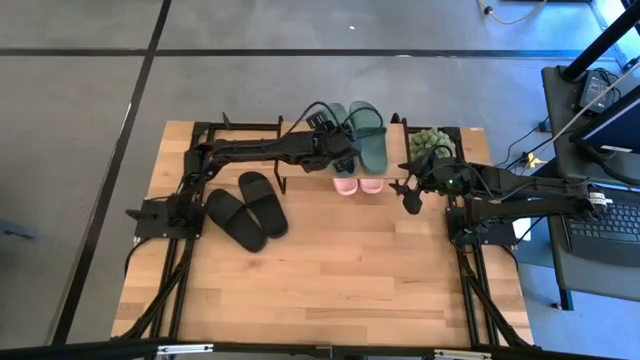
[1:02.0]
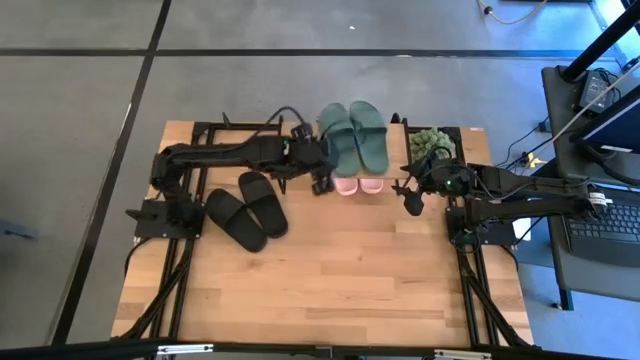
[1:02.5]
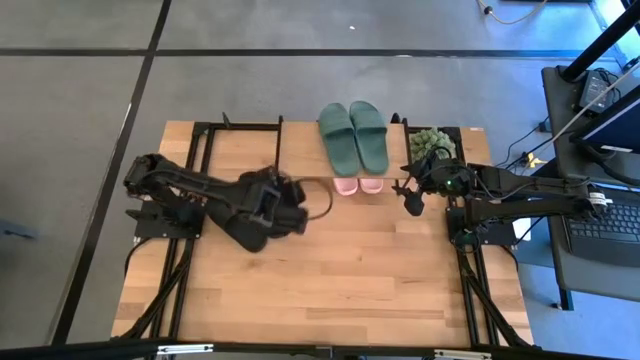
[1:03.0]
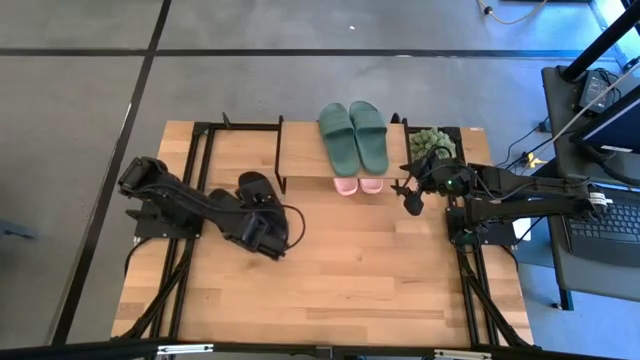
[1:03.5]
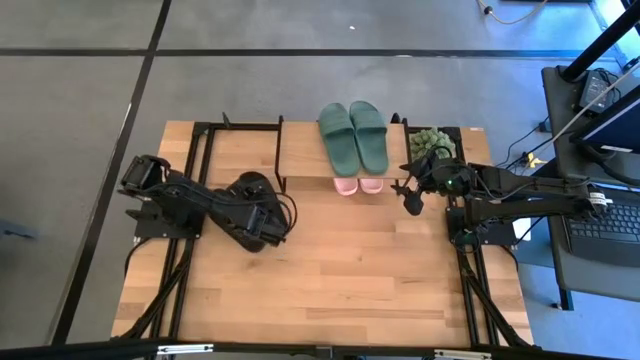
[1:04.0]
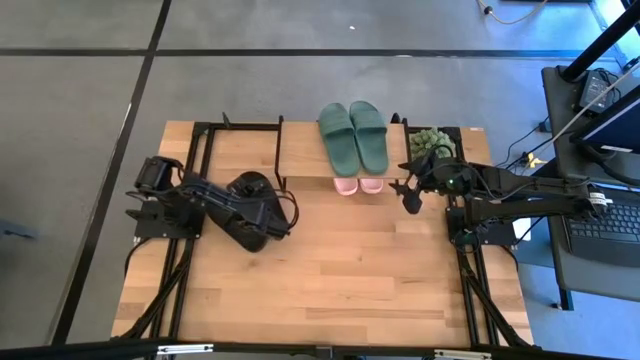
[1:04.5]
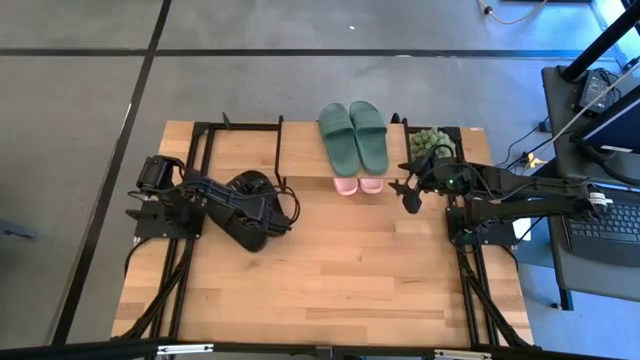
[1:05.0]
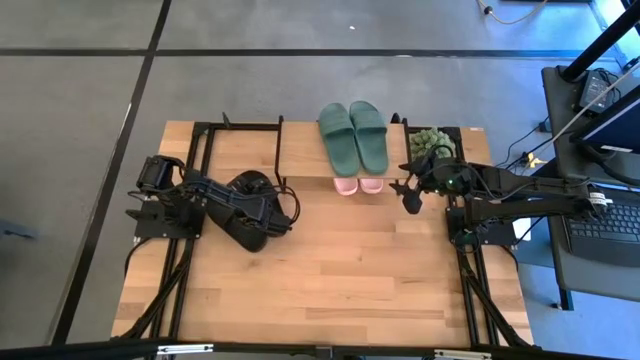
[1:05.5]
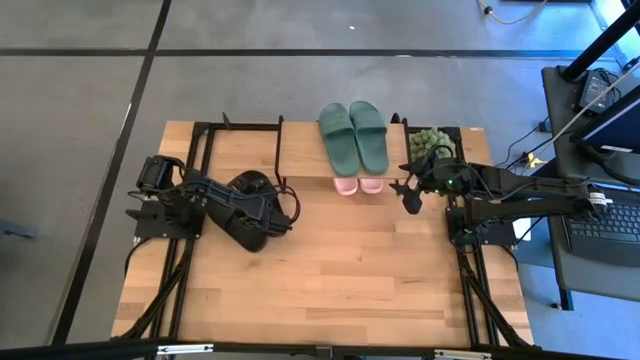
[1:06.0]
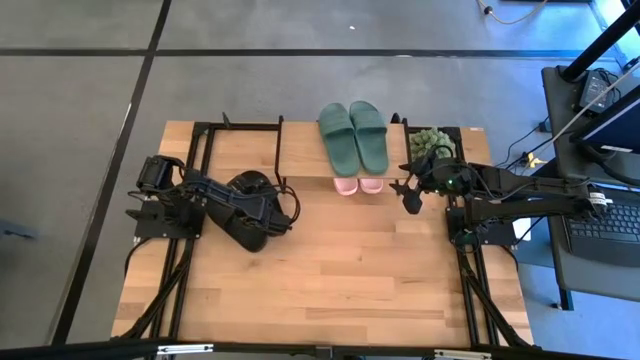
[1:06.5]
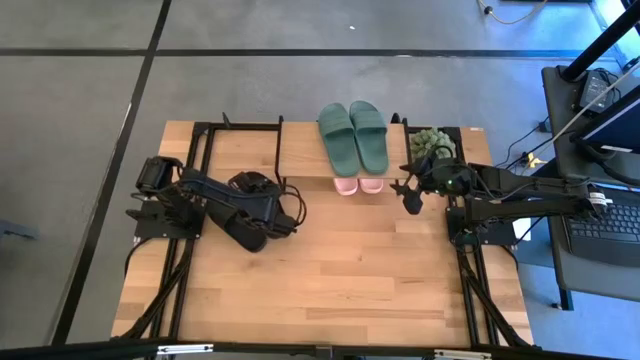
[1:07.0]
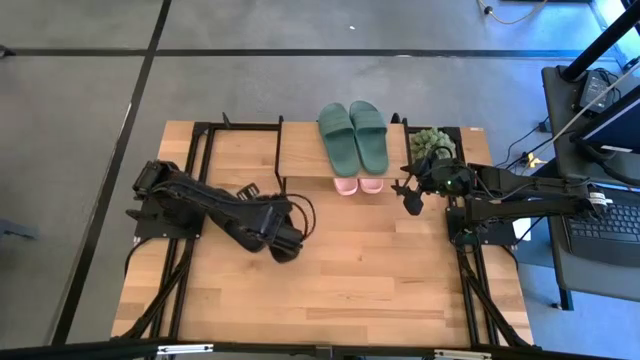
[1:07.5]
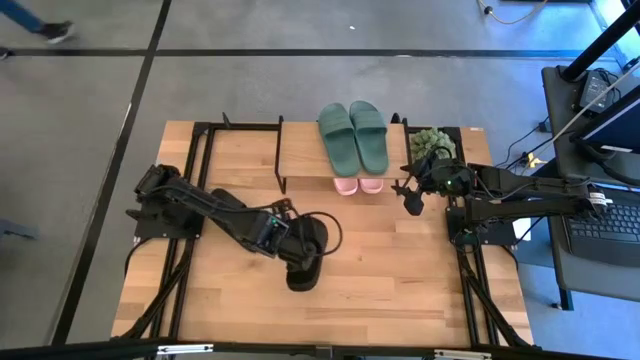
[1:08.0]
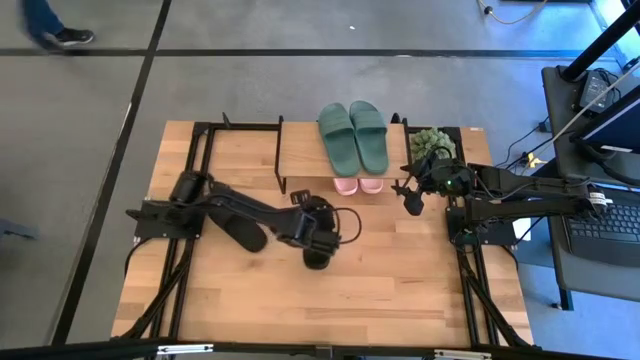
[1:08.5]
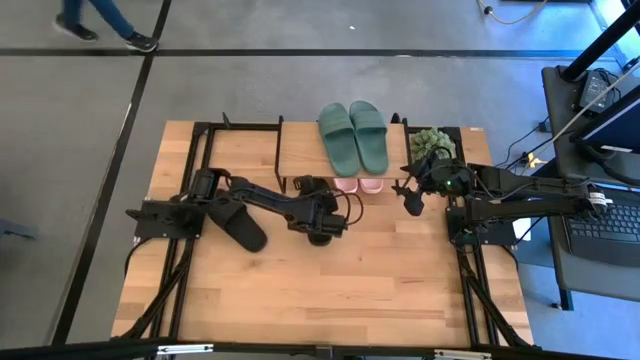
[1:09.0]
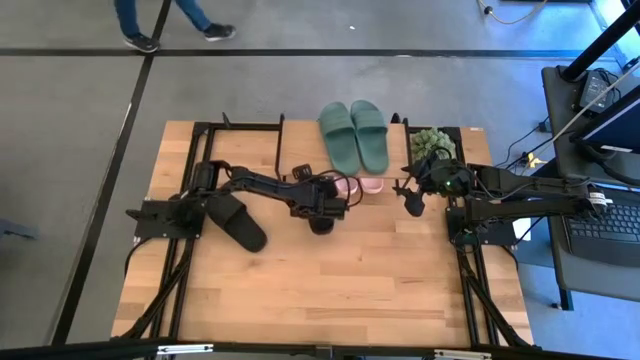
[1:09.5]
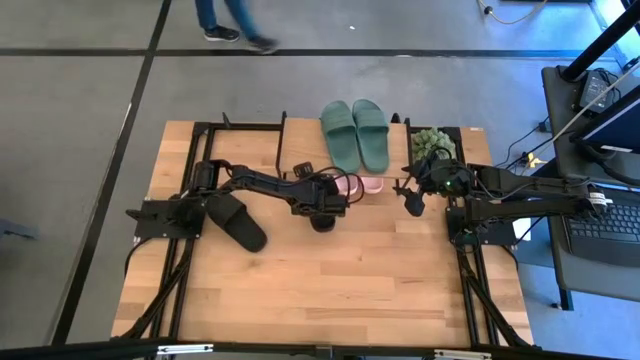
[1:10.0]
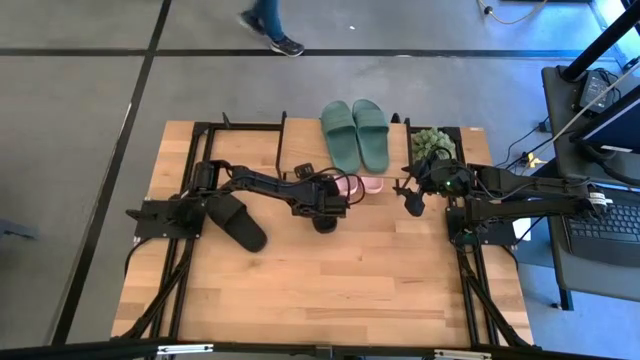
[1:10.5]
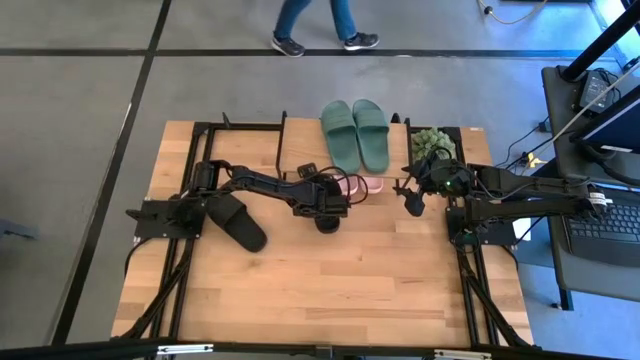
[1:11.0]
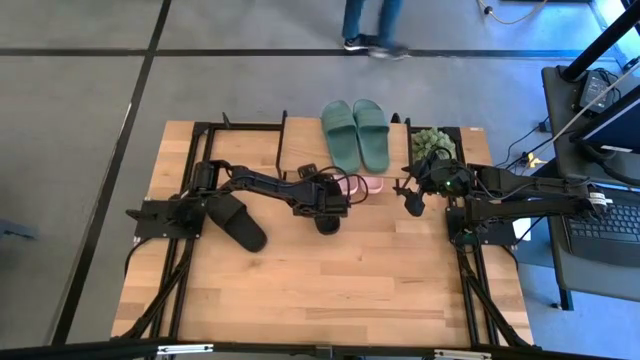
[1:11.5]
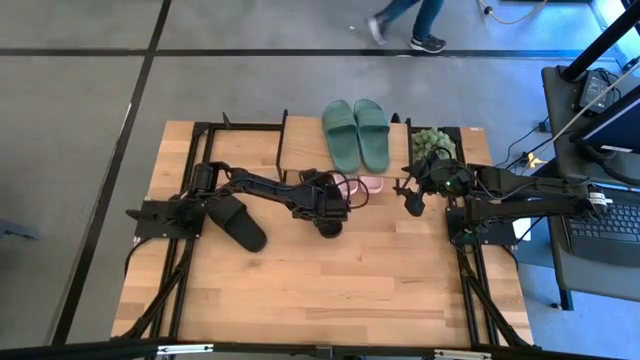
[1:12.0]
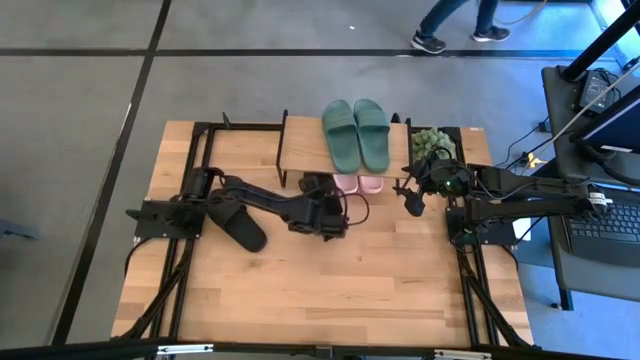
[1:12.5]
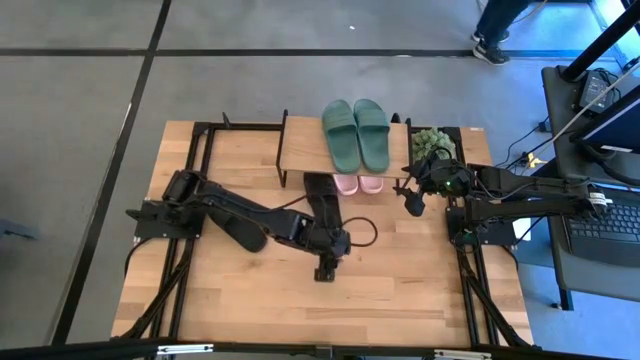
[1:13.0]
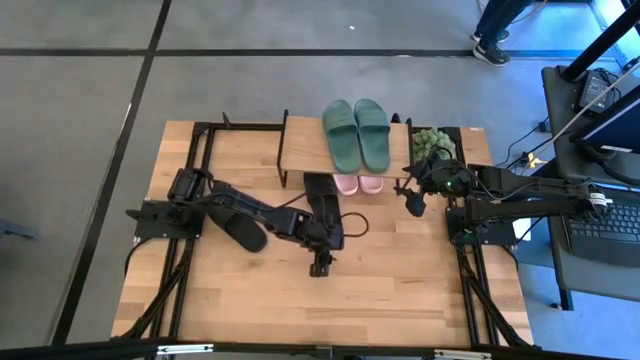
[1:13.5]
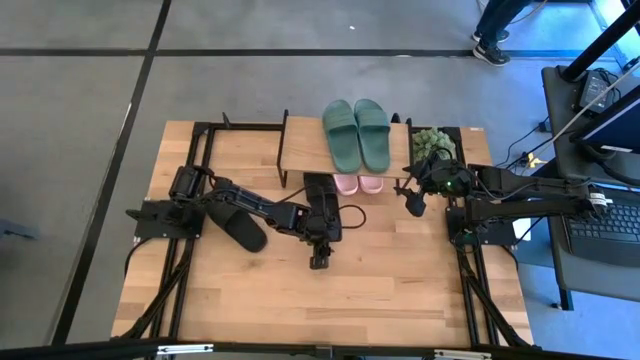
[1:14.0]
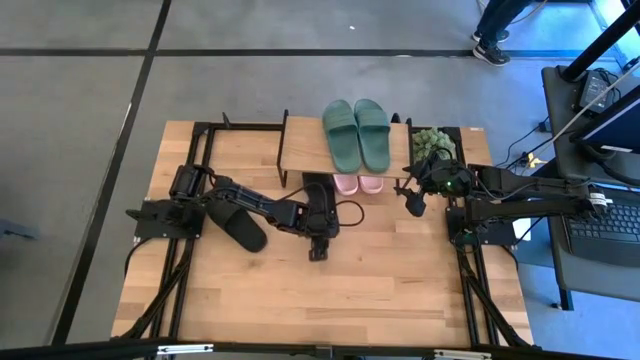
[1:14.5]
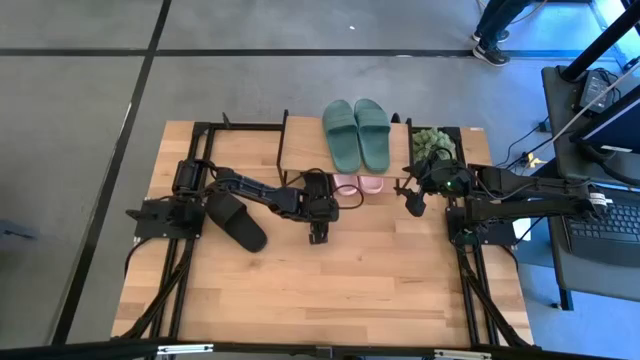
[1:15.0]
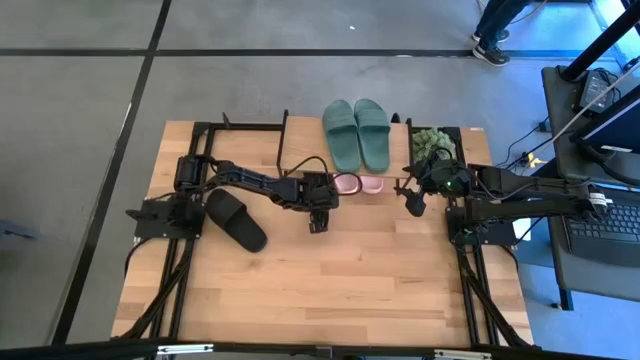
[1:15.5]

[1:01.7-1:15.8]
Task: Pick and place slides into the shelf
Put the right black slide under the shelf

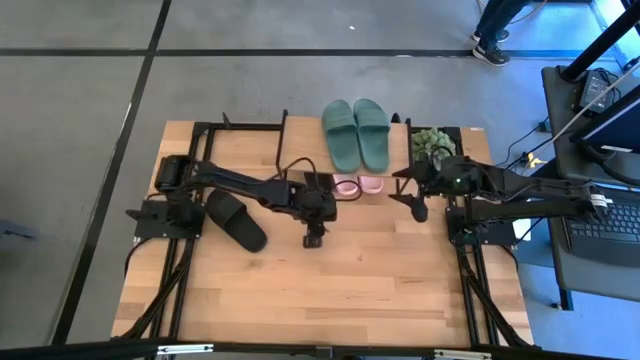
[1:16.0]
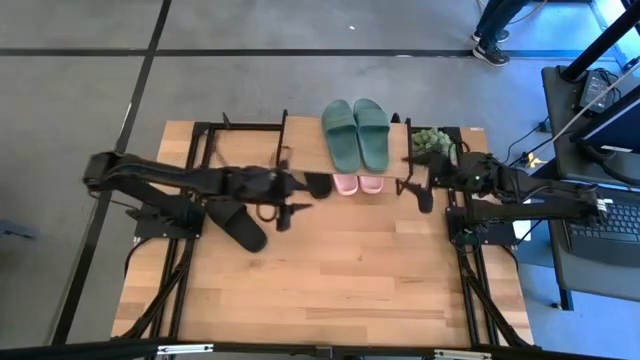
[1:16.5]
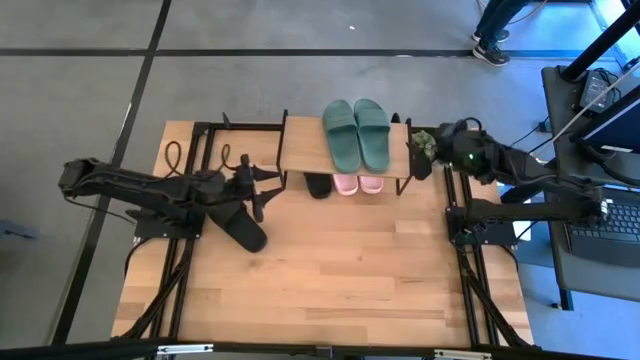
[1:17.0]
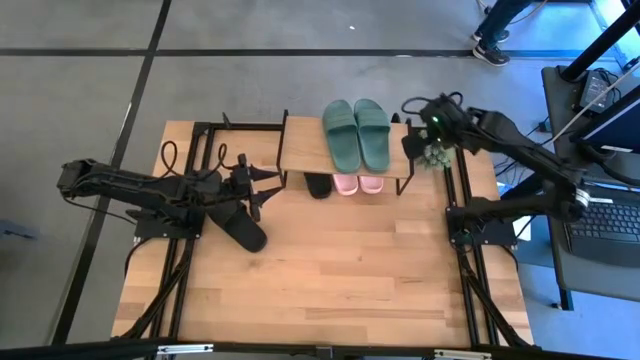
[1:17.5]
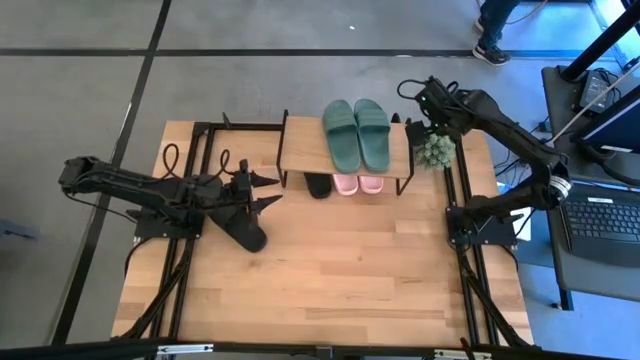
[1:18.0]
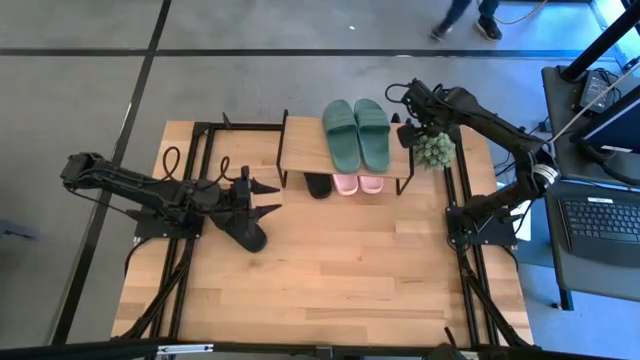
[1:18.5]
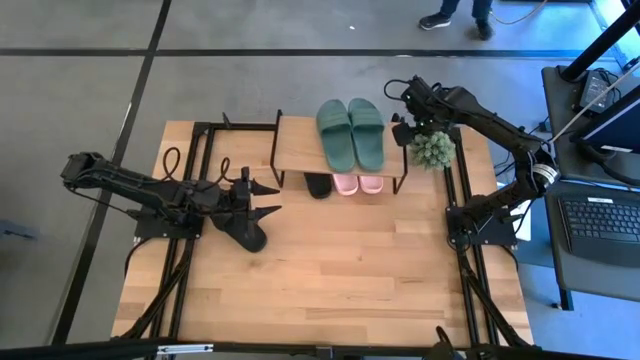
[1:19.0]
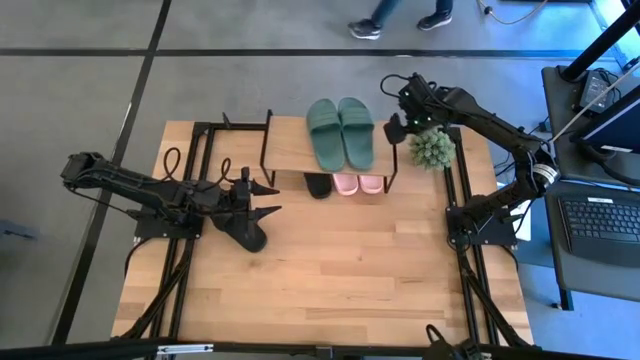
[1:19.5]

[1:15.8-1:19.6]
Adjust the shelf
